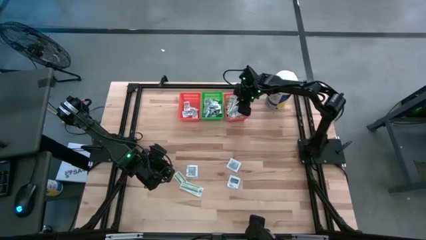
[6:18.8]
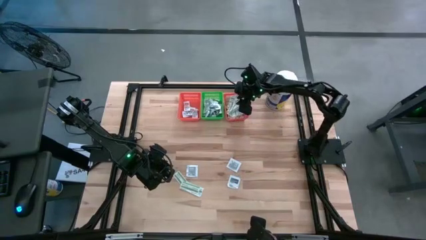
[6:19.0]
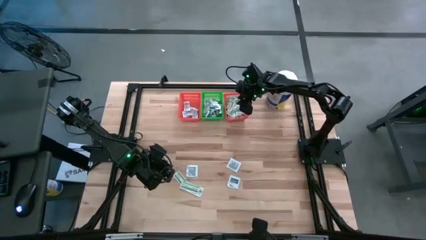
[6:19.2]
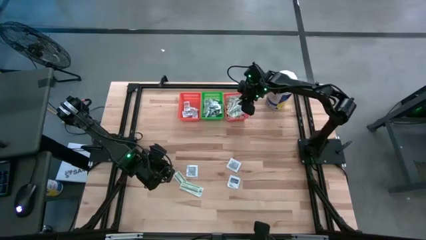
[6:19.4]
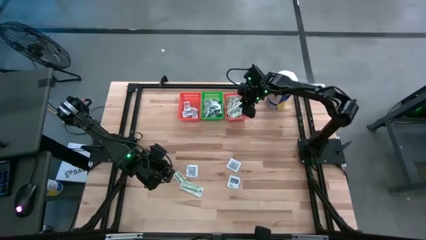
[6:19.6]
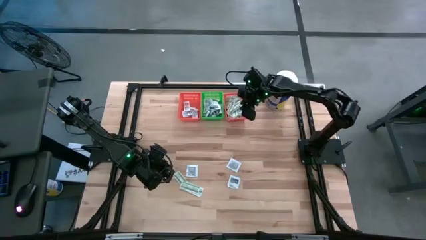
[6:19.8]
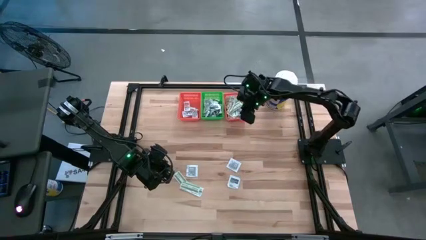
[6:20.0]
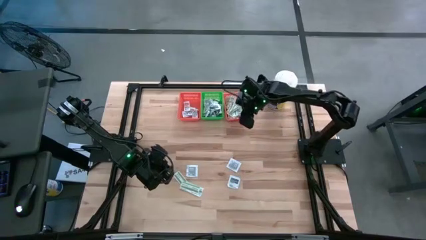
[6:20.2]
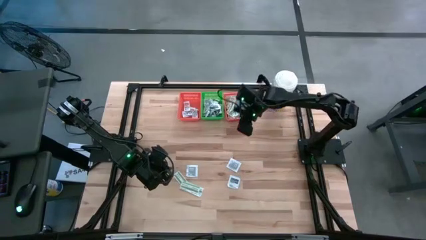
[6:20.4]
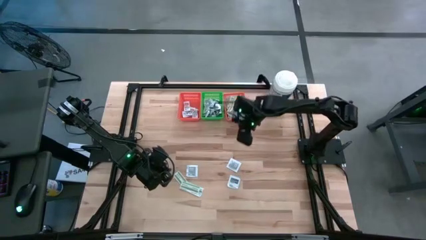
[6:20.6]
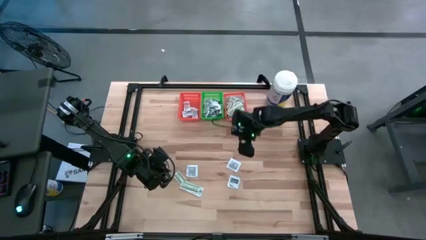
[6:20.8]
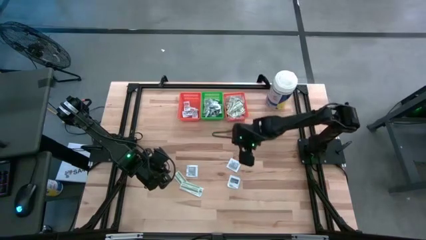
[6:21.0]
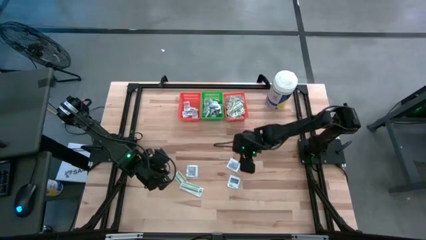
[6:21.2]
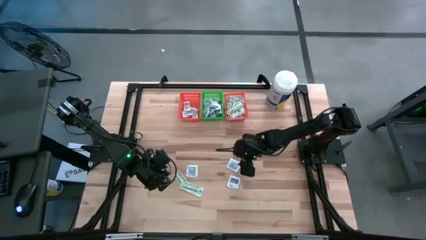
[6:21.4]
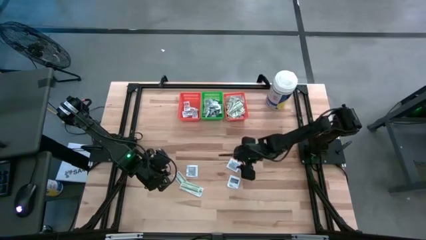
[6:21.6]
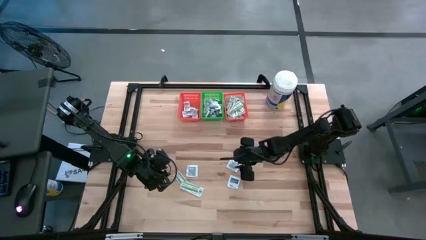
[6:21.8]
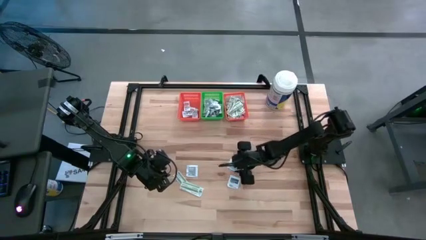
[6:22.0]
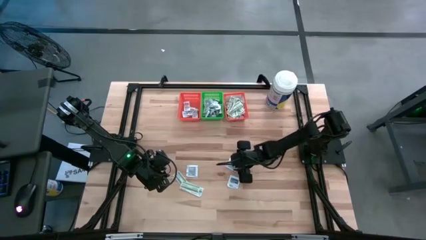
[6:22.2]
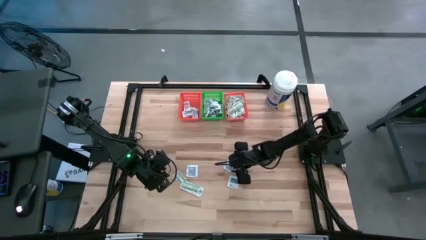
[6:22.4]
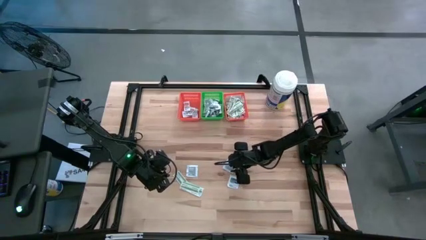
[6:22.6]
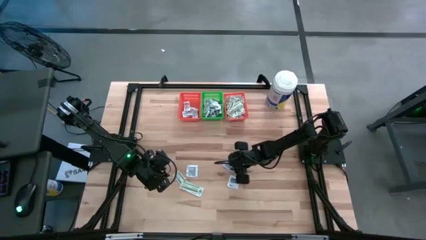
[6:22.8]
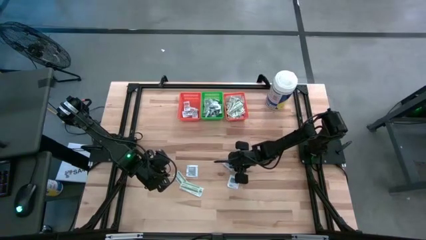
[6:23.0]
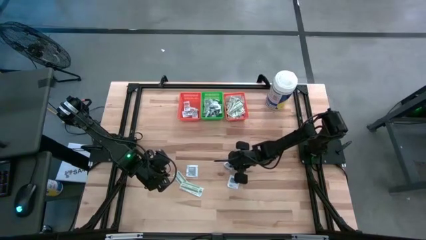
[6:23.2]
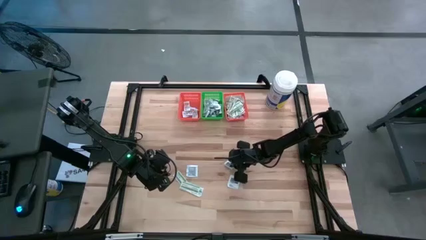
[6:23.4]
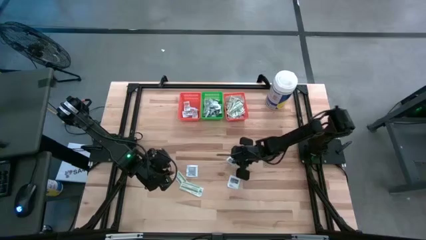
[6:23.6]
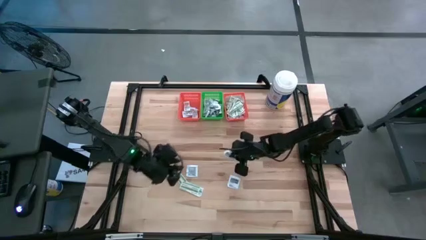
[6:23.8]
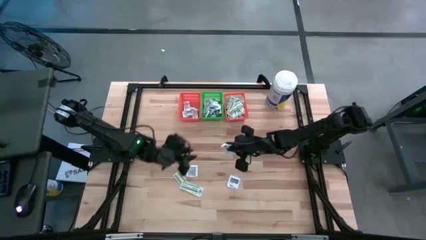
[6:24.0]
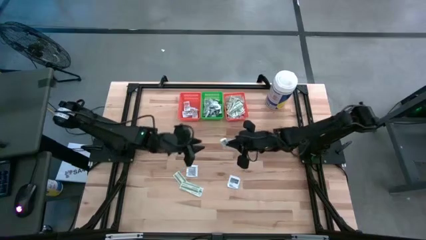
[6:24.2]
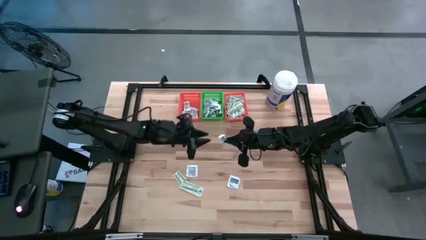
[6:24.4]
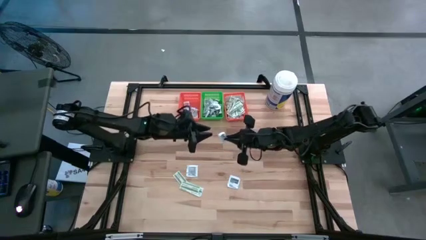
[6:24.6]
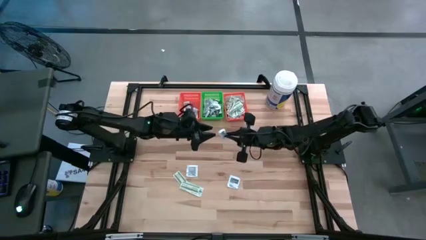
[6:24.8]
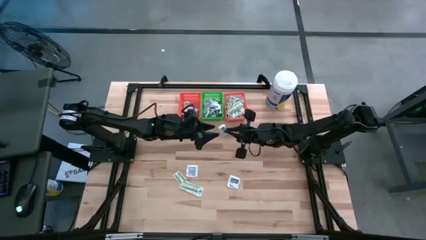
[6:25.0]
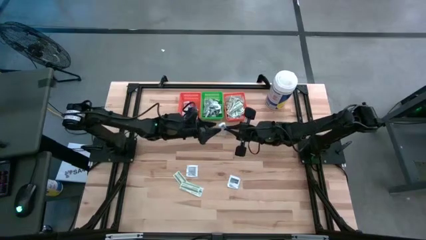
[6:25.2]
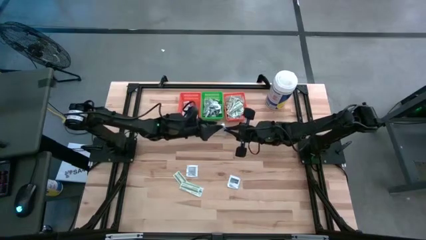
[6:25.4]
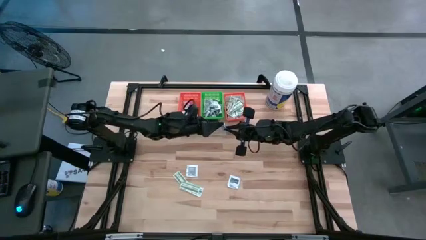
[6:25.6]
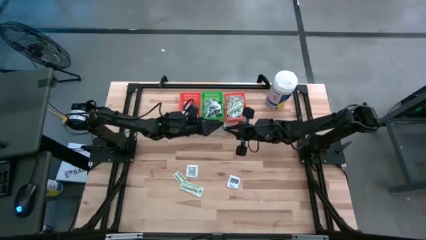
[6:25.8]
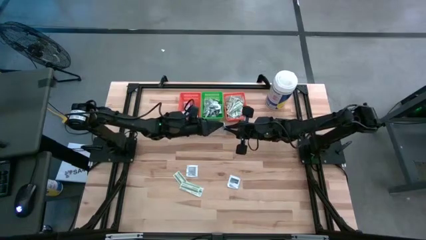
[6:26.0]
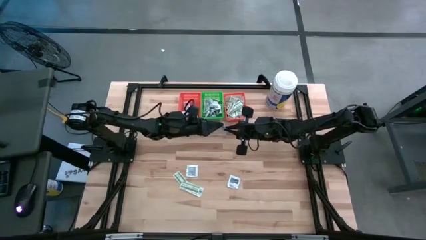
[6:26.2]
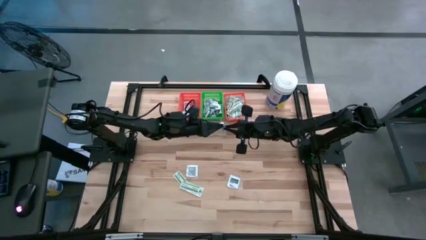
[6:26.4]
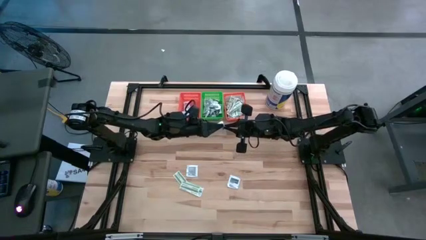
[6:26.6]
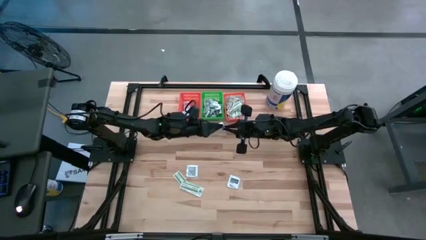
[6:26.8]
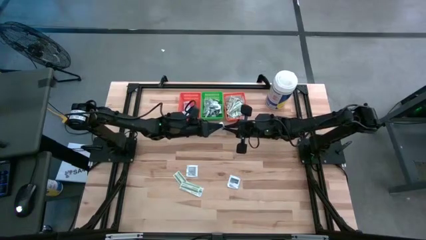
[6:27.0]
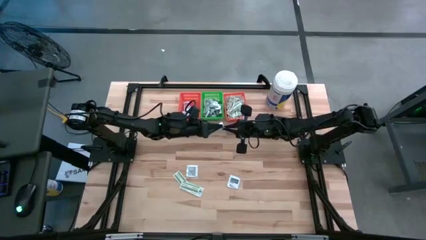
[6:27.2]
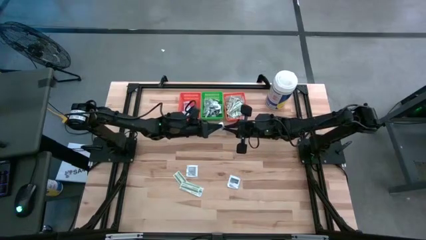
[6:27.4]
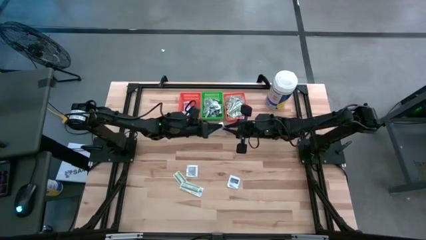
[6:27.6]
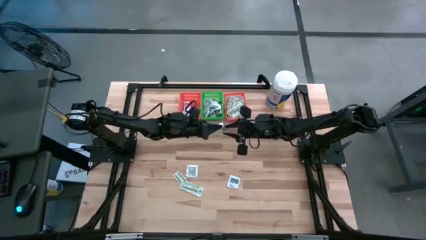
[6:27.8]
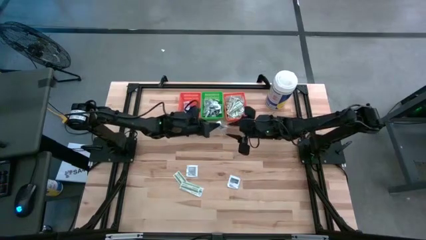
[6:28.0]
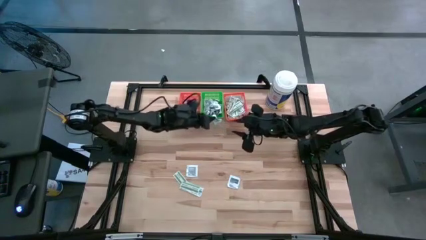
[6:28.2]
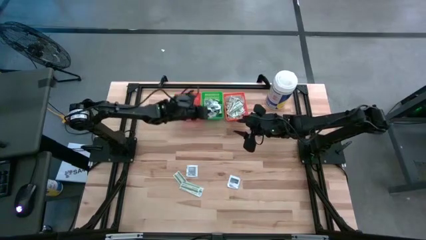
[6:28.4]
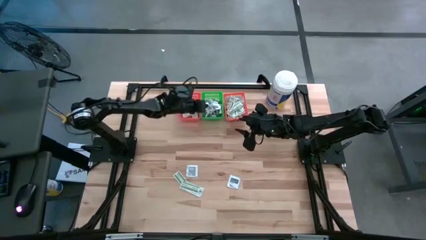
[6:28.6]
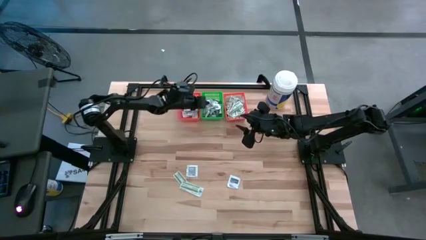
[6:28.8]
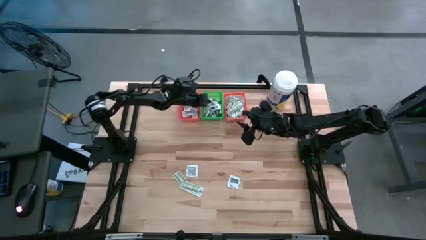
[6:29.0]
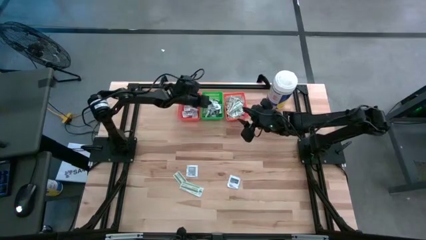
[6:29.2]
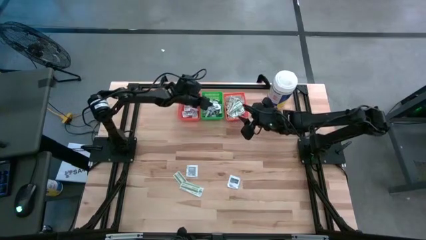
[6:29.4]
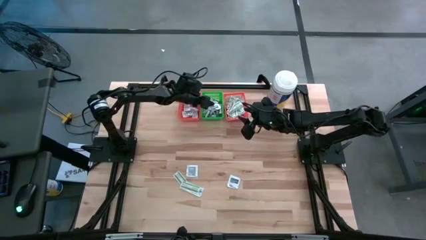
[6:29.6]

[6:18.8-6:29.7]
Task: Pick & Place First Aid Supplies
Put the top towelette pack into the green bin
